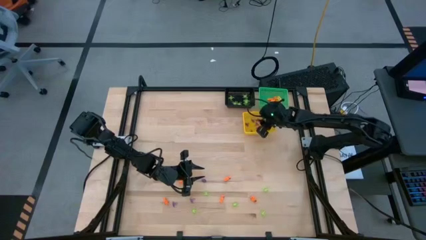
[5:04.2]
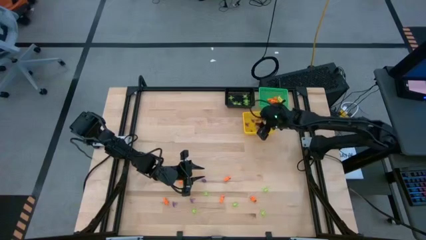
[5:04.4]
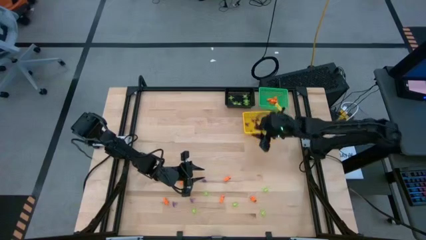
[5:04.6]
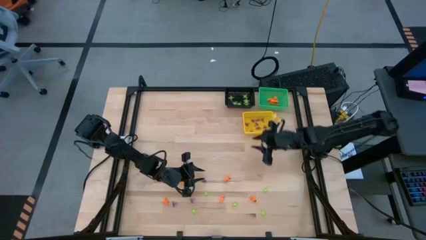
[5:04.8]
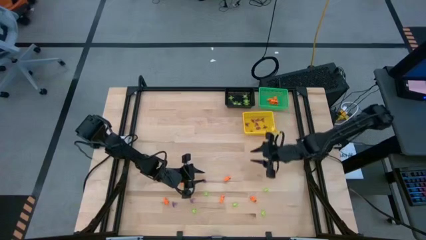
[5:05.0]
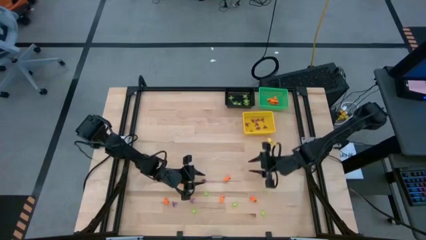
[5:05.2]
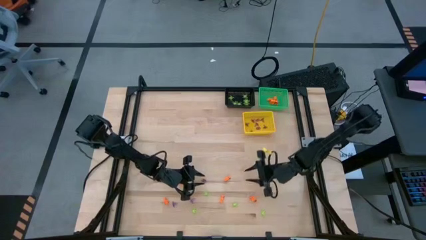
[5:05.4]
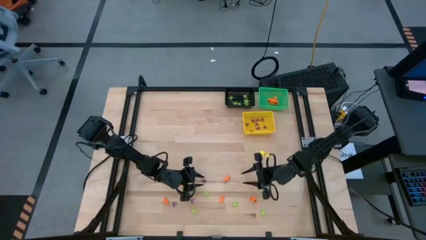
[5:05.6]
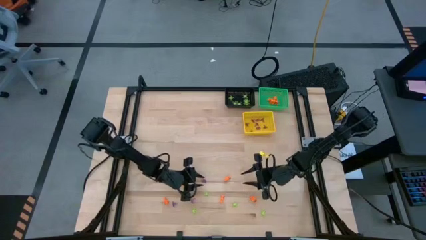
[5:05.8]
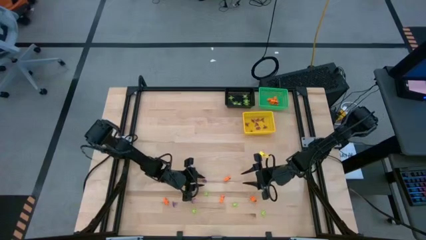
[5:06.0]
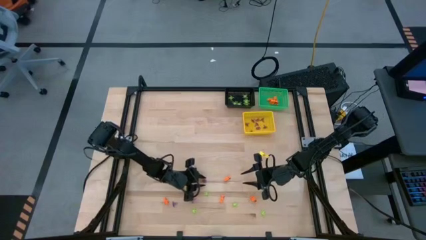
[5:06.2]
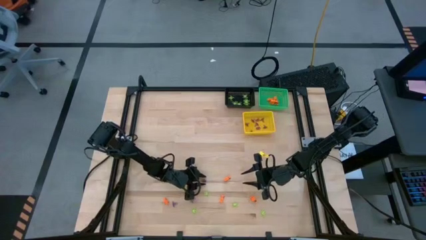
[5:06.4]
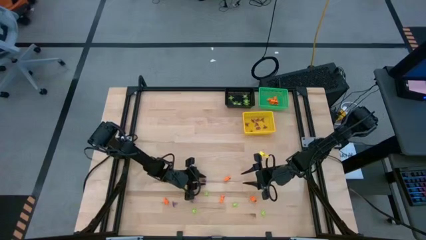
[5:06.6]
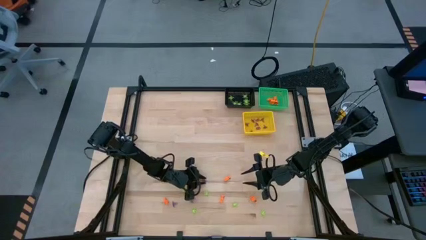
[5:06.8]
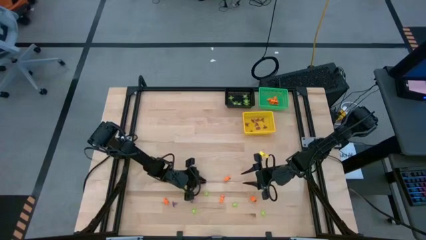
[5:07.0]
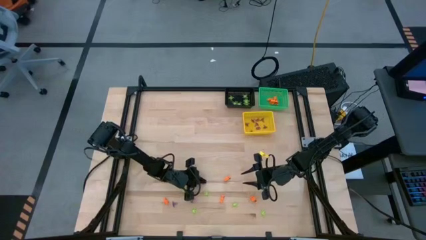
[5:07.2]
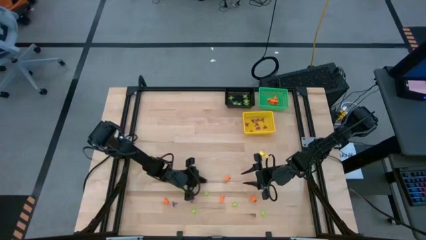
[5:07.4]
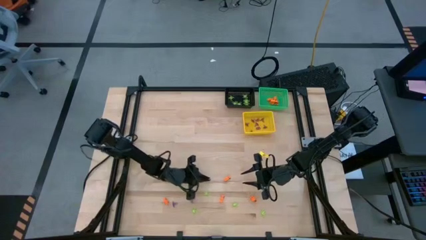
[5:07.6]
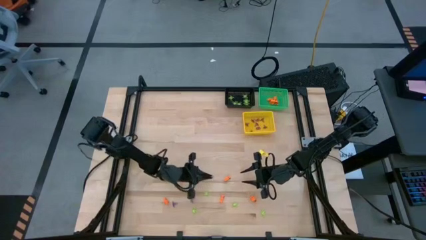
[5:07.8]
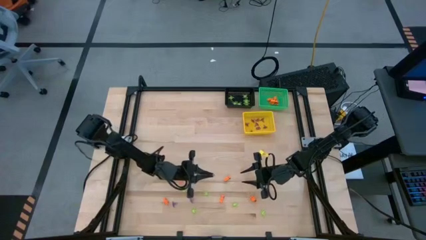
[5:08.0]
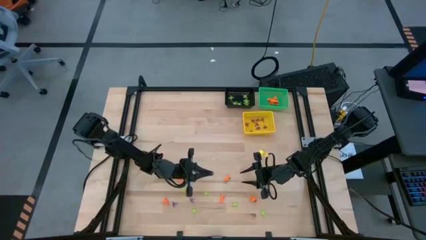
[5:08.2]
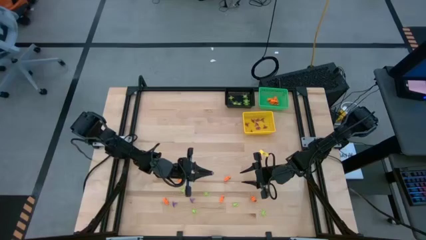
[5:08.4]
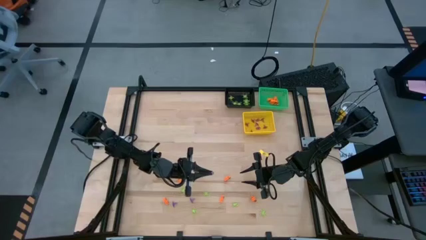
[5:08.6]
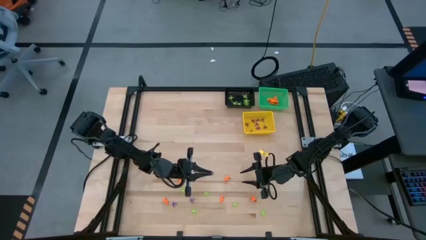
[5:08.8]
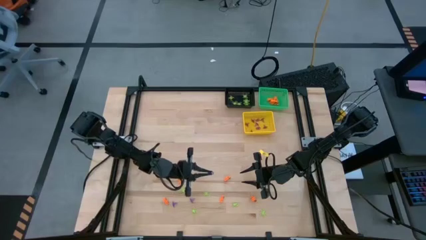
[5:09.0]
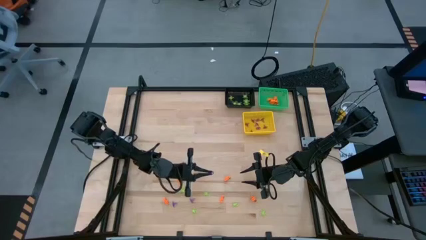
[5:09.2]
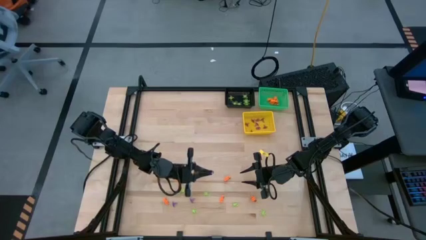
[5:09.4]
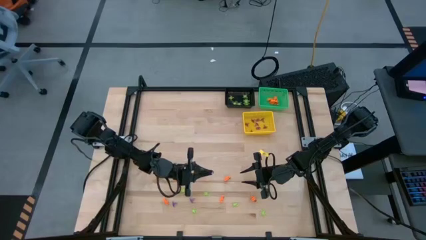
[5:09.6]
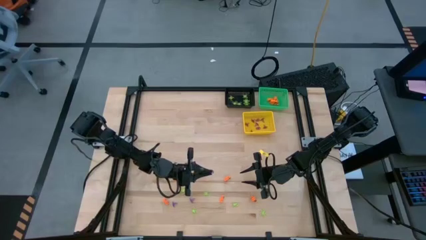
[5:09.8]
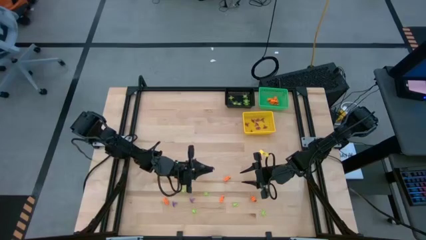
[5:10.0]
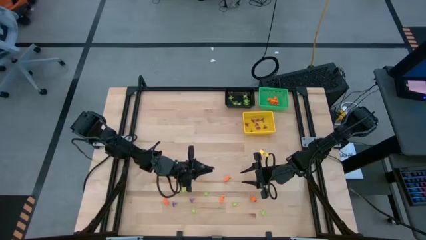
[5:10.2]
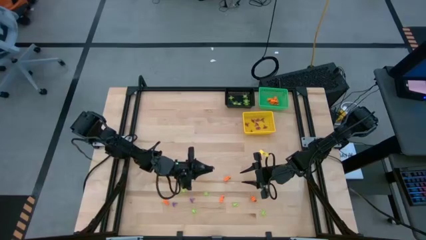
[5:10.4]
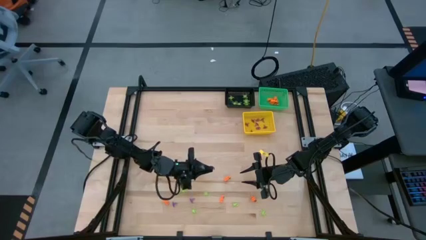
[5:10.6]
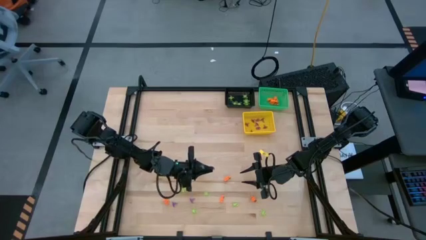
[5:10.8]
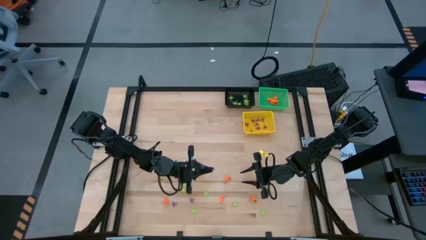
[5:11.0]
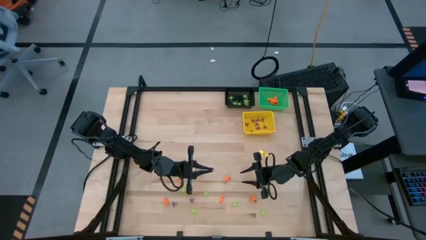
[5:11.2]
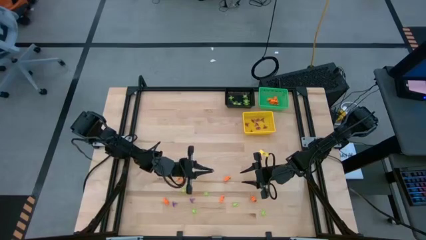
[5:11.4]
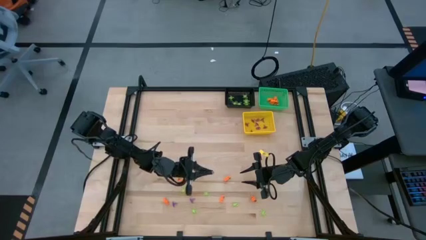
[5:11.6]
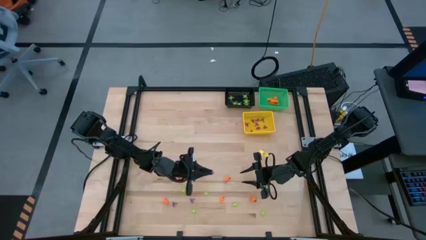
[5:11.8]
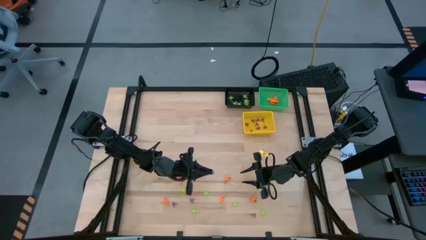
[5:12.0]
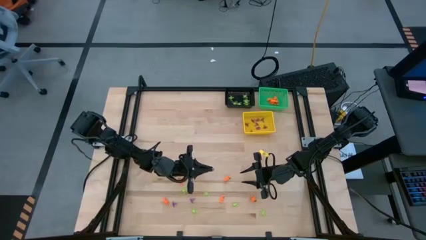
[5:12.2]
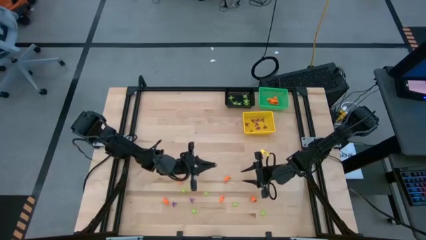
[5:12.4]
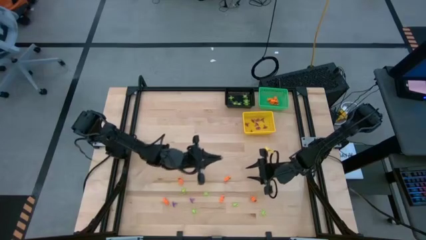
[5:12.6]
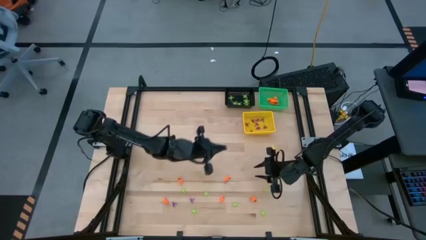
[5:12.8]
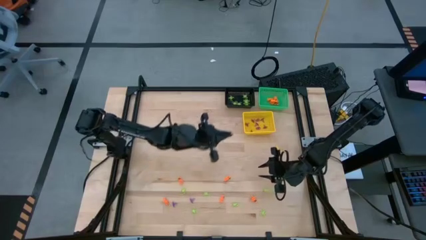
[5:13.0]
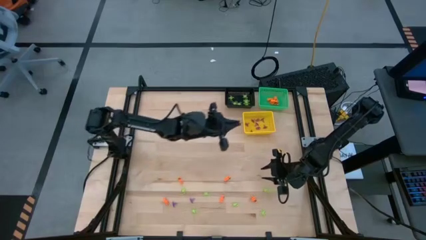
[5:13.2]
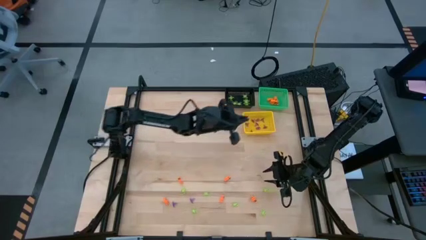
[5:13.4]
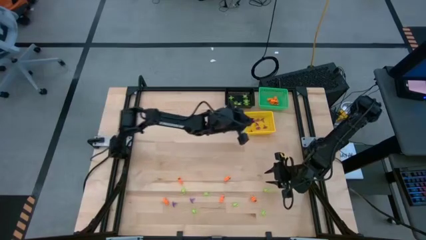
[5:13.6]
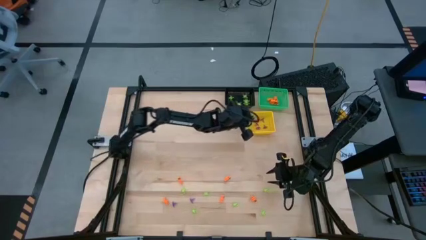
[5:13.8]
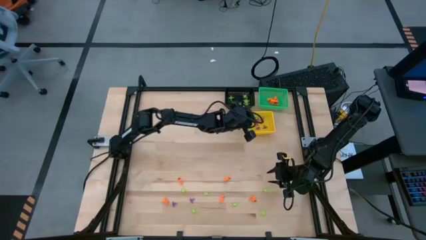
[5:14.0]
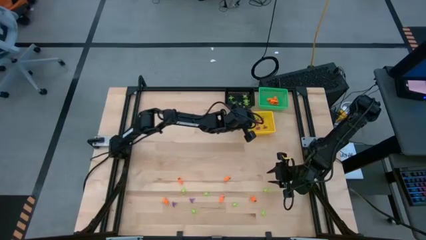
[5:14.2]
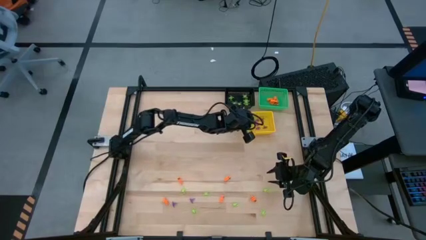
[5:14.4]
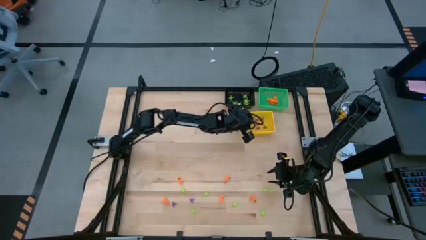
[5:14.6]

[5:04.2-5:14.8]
Task: Sort Halloween decoration
Put the violet witch hat toy into the yellow basket

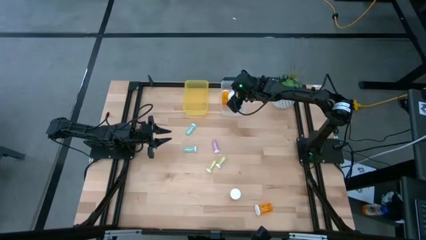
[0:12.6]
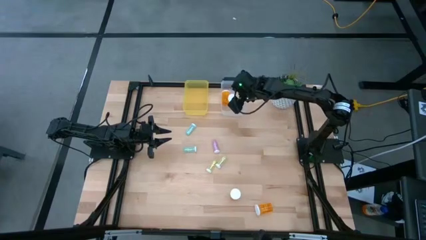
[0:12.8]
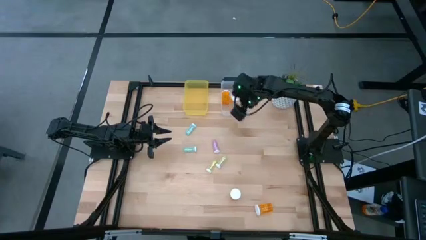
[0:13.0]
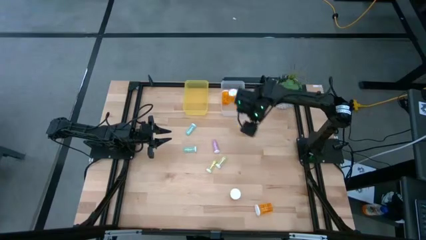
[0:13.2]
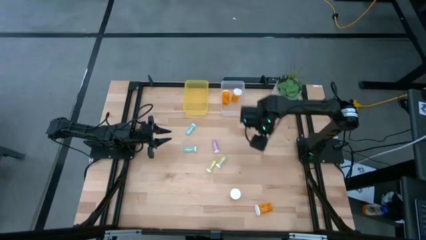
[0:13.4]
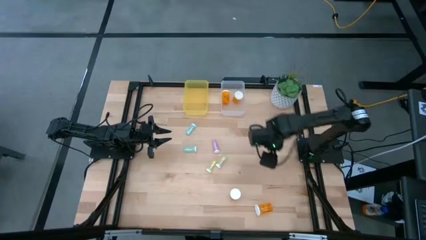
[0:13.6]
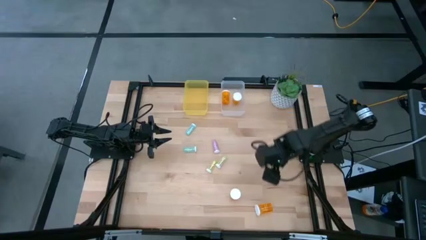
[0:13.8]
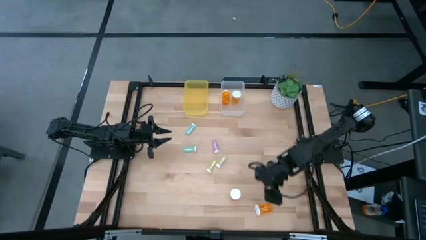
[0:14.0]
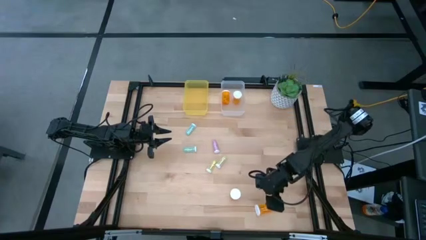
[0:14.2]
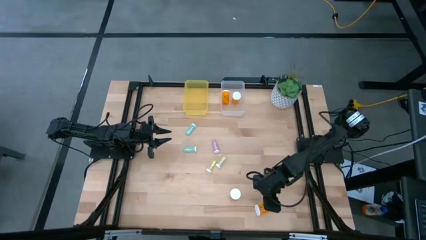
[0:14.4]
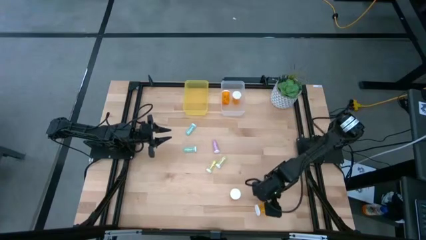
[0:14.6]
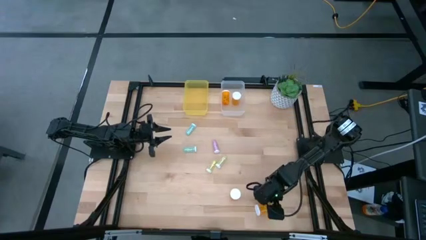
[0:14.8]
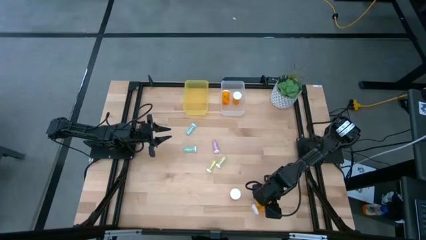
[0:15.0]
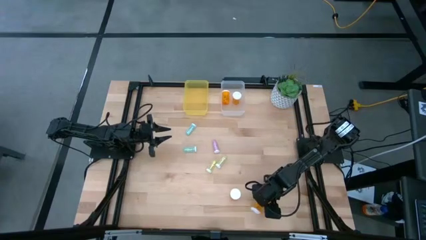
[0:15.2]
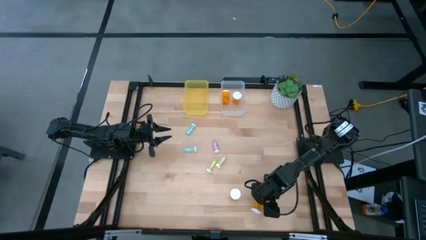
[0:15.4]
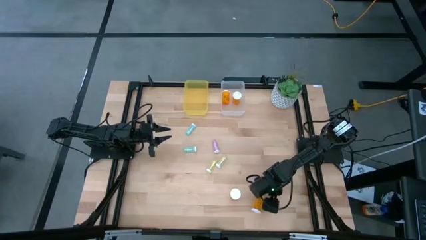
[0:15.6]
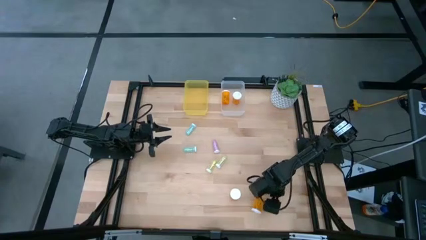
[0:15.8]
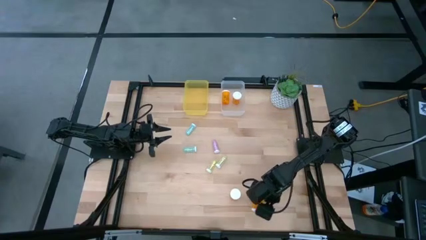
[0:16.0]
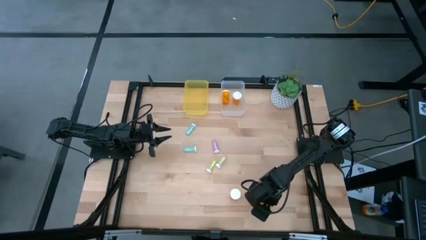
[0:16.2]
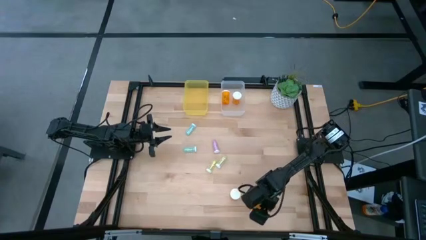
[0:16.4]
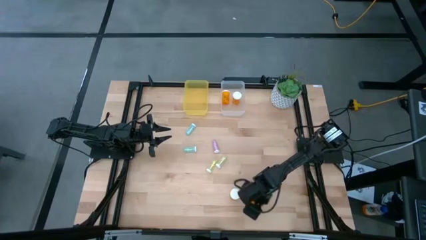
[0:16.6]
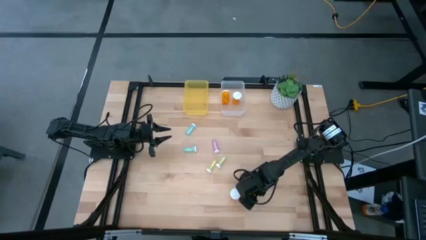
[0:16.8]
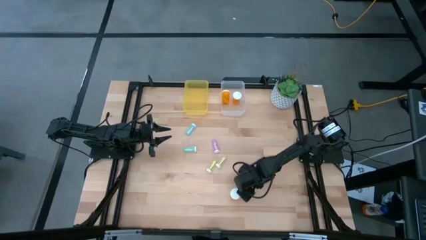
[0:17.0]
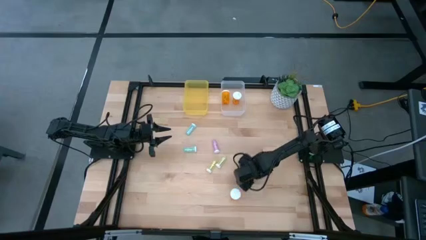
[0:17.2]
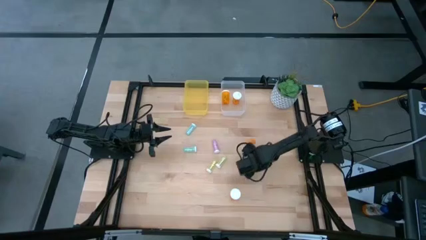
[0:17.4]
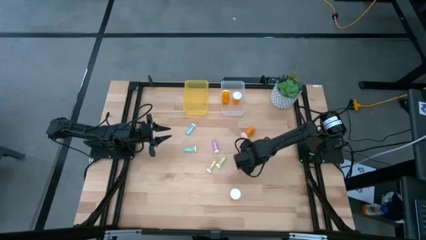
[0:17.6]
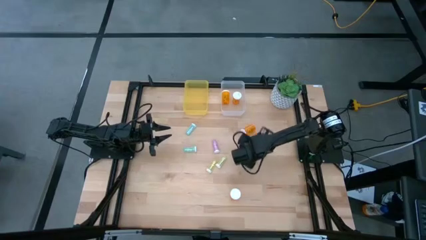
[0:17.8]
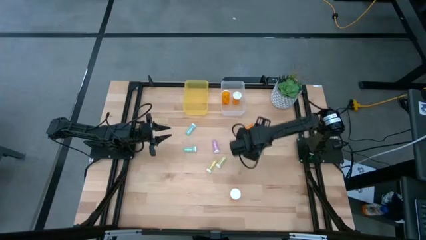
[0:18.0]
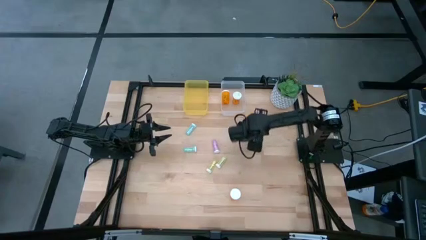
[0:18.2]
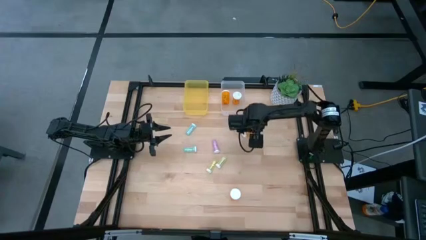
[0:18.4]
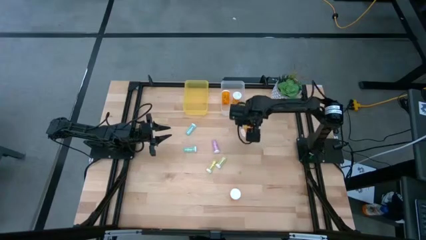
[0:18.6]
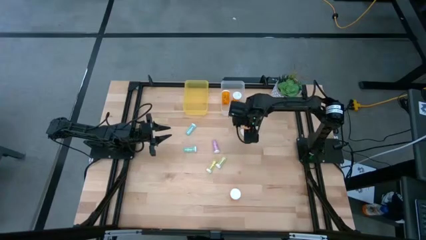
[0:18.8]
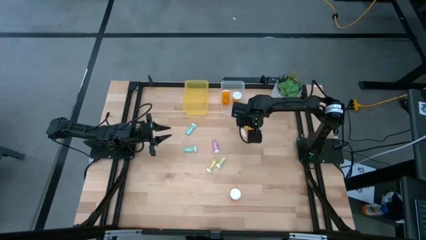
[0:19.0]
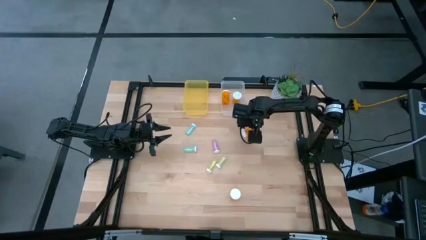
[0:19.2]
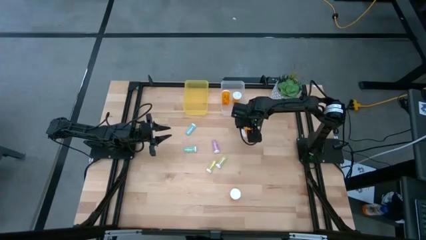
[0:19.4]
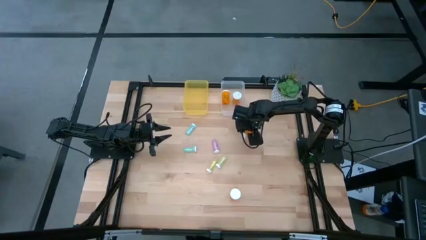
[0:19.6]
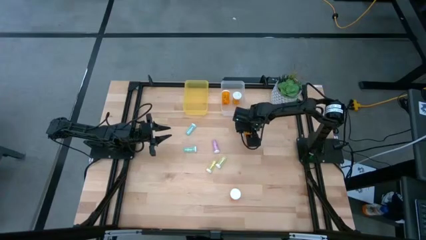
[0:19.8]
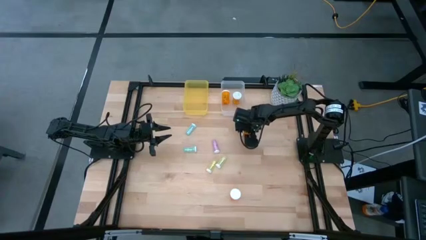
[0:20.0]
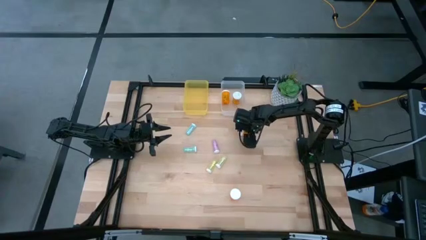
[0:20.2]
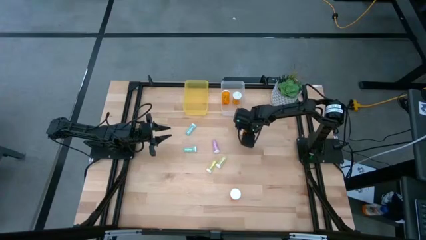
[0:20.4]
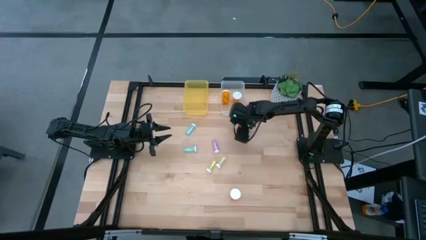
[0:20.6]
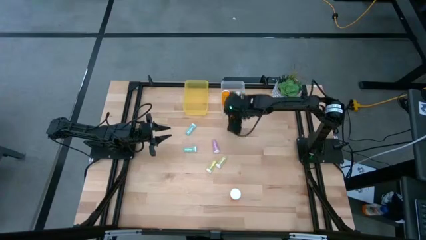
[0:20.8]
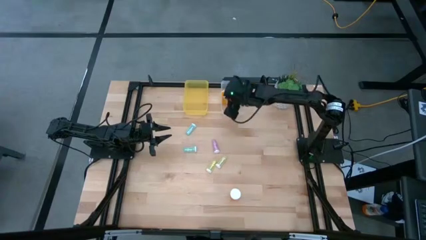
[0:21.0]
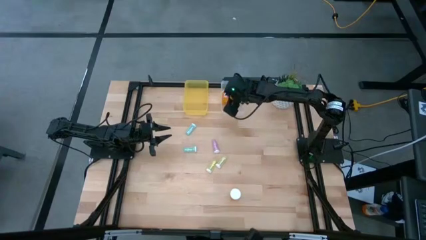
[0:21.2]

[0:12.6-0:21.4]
Task: Pick and place medicine bottles into bin by pill shape (circle, oval)
Put the orange capsule bottle into the transparent bin
